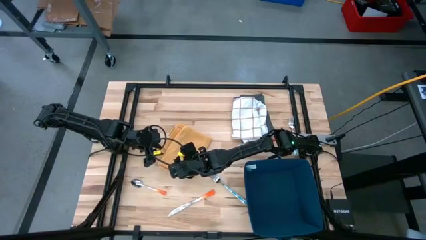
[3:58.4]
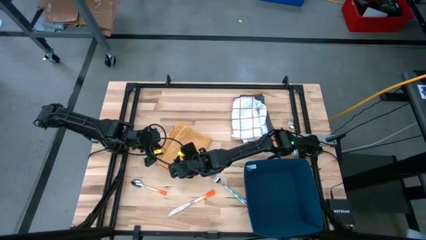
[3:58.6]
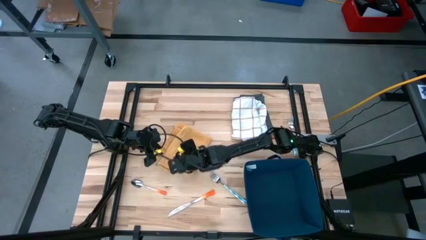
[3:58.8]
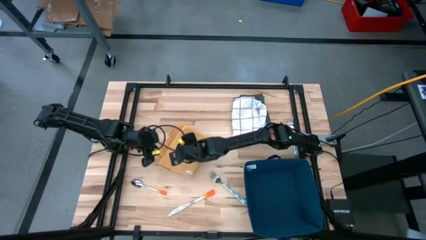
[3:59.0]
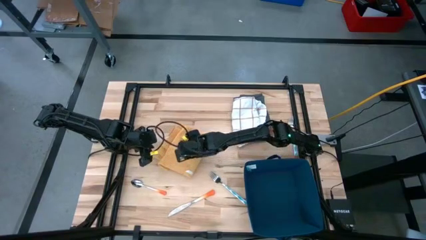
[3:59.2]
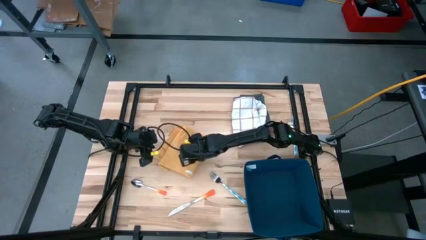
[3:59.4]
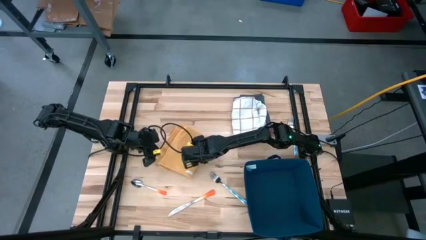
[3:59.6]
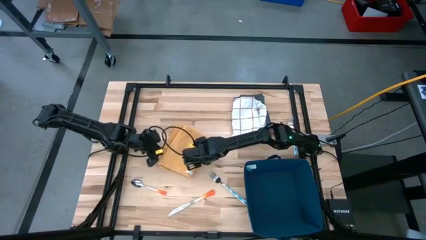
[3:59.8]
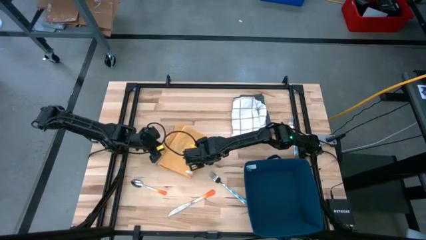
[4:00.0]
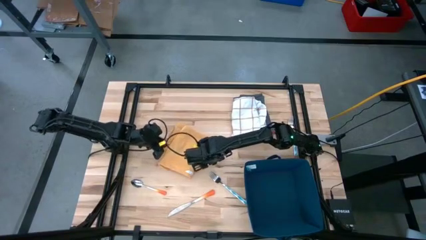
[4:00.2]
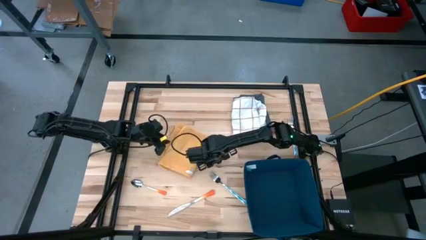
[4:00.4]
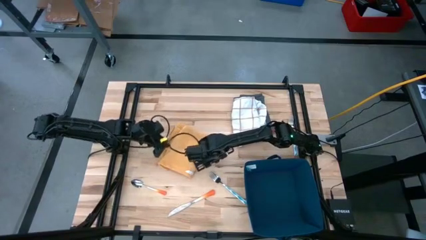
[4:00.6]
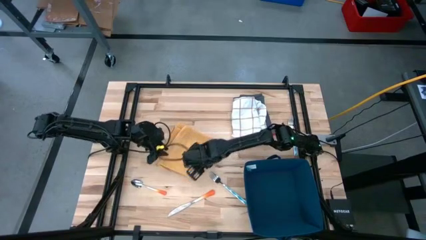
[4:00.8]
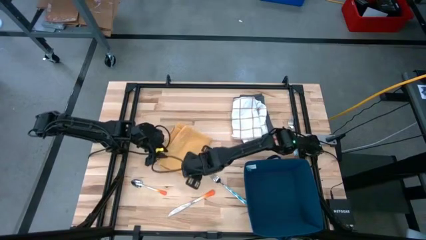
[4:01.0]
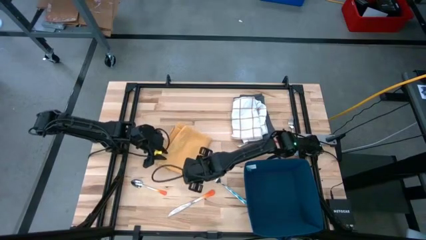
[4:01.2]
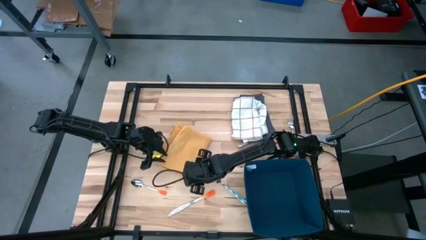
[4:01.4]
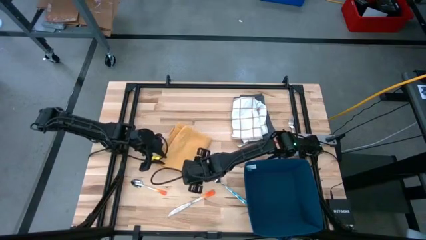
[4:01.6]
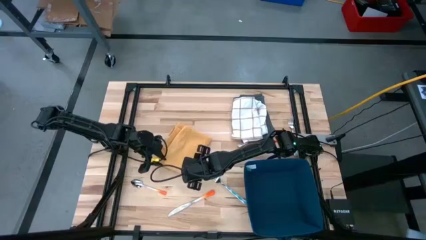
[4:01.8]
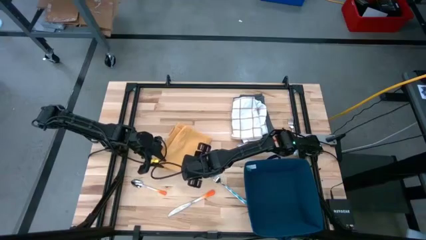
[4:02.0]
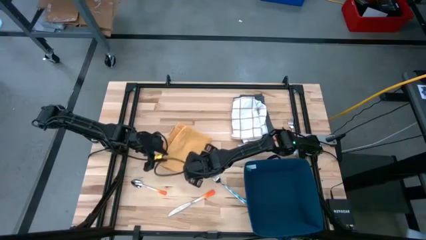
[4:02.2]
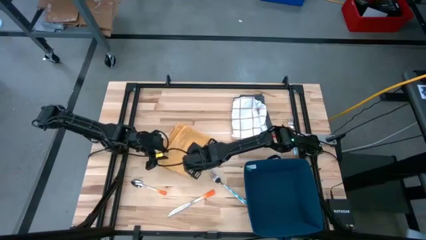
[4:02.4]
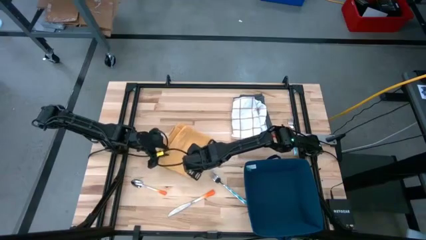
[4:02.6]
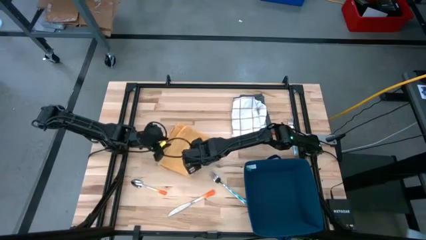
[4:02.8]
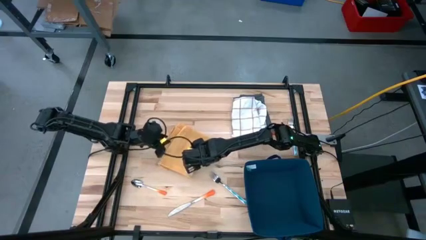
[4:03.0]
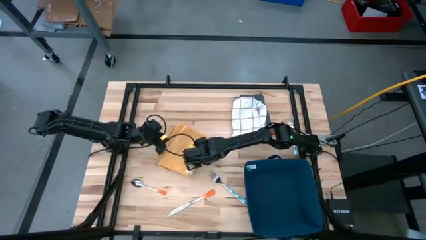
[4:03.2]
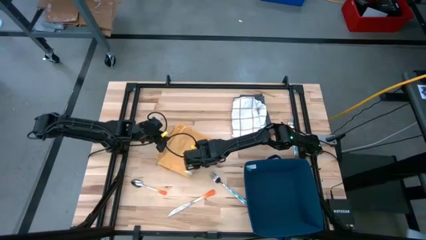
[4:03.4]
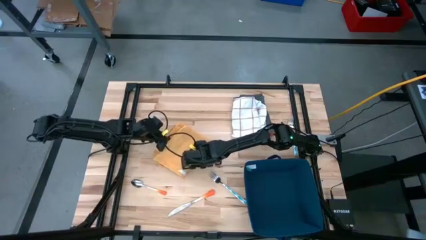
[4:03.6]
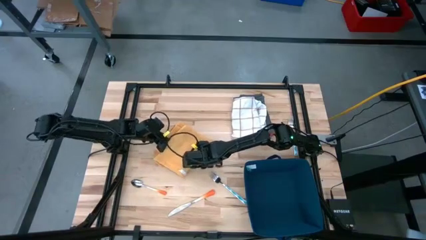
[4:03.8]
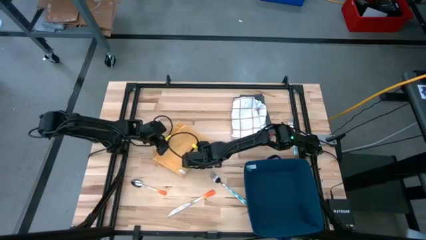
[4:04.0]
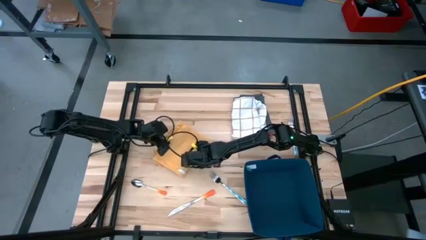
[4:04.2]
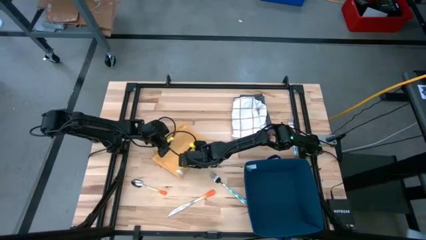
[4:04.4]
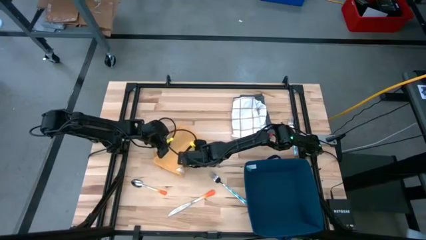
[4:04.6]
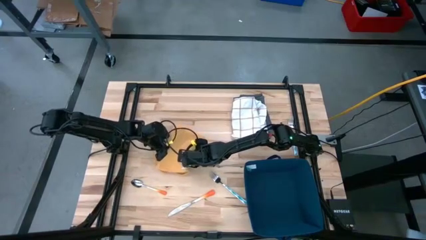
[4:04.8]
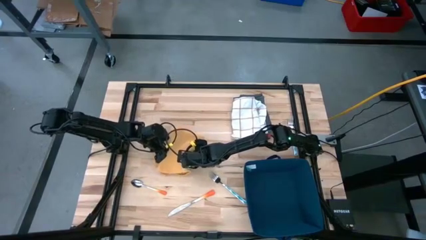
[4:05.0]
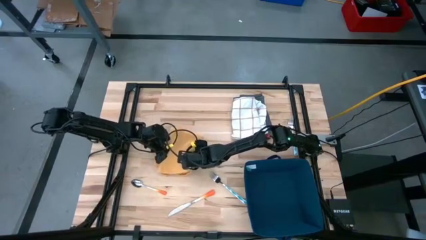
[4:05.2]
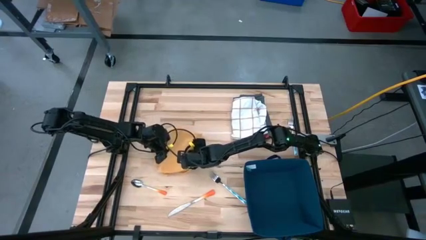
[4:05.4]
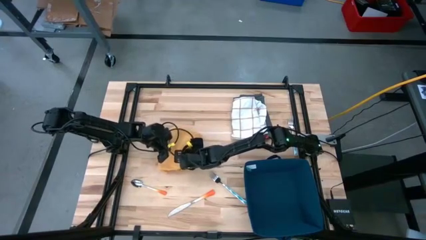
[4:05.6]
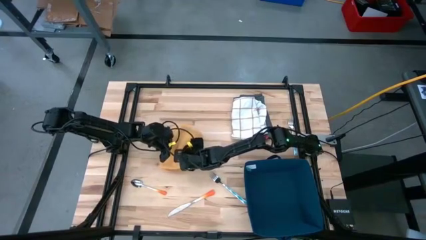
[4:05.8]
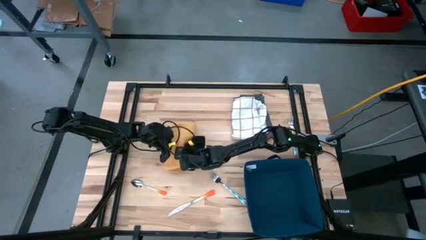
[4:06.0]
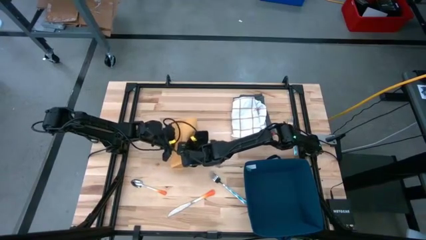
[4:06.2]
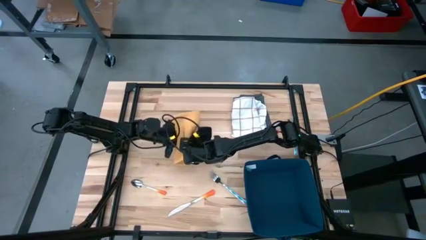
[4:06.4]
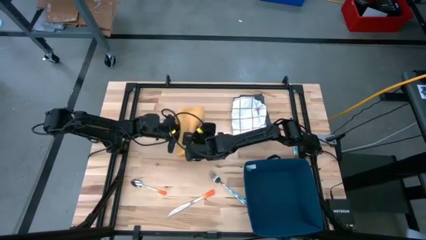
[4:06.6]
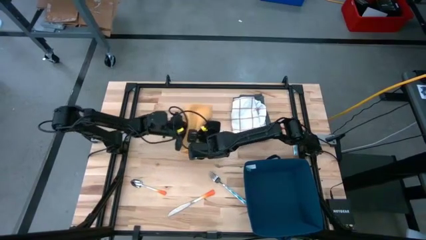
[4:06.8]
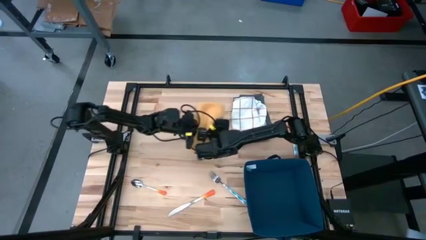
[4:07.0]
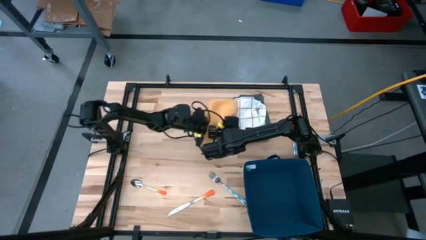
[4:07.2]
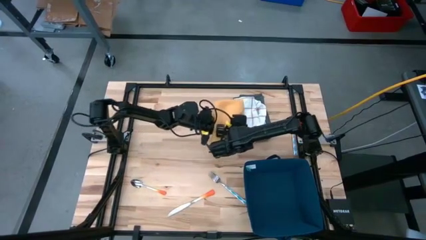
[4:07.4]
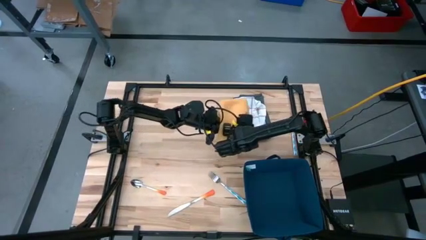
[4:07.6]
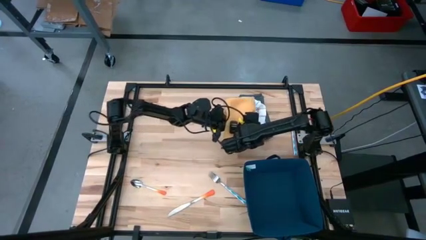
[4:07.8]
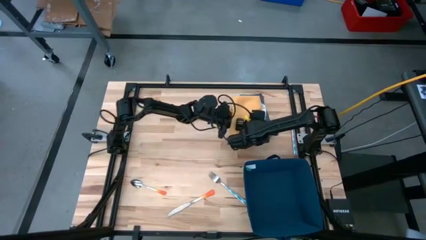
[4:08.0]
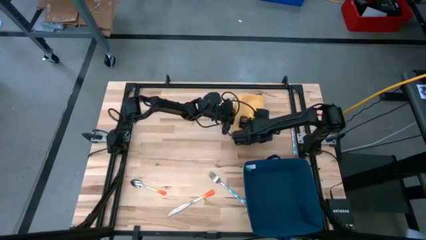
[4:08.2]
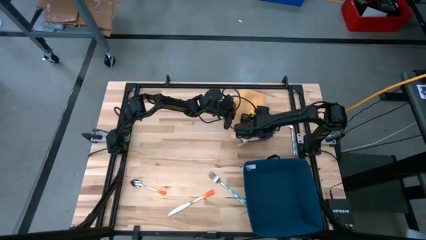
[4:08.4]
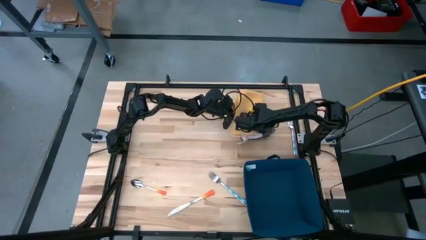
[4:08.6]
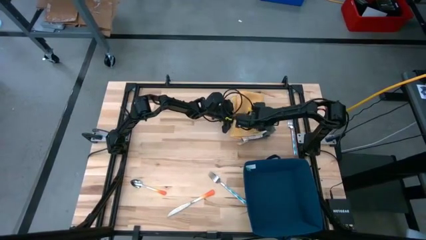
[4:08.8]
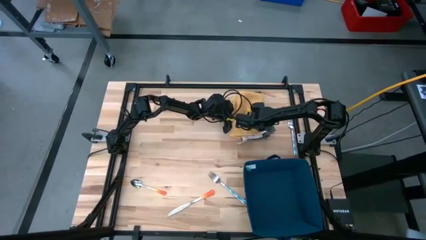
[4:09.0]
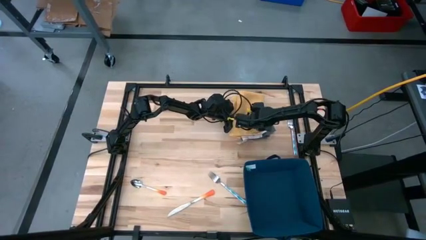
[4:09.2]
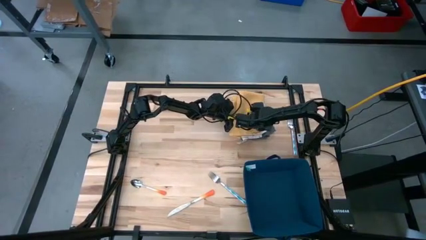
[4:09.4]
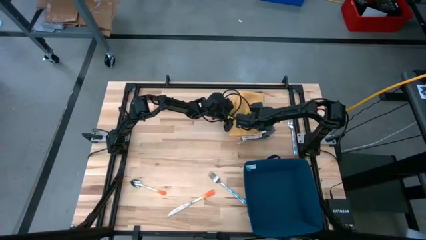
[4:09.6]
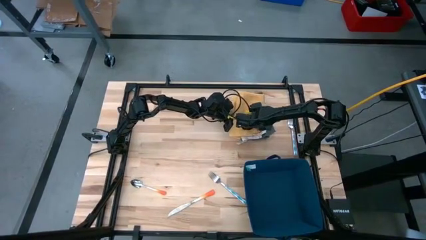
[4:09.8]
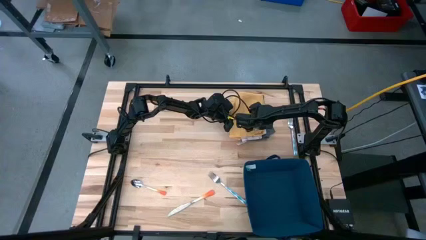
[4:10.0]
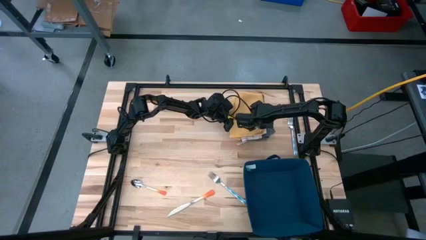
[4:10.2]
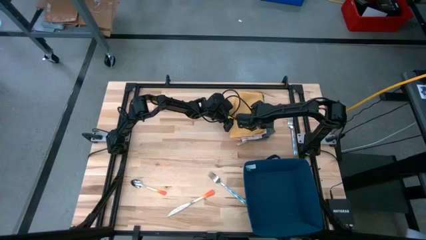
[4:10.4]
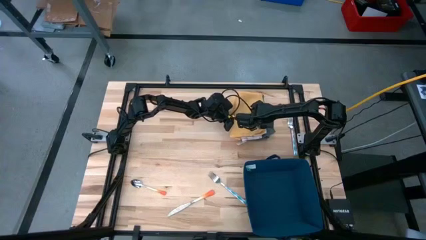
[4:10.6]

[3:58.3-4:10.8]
Task: Fold towel
Stack the orange towel on top of the white towel

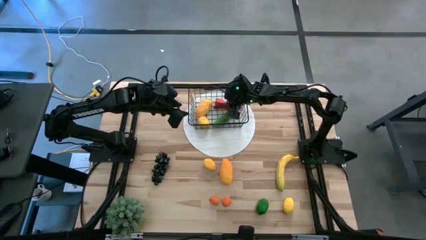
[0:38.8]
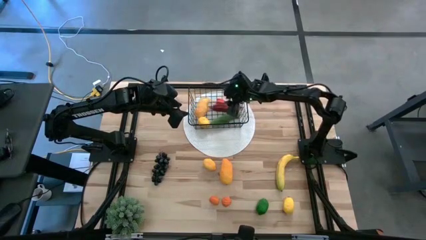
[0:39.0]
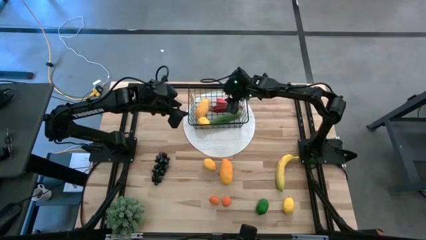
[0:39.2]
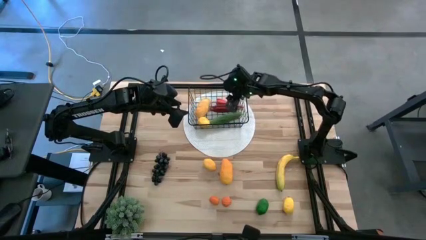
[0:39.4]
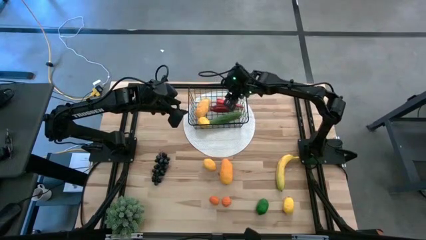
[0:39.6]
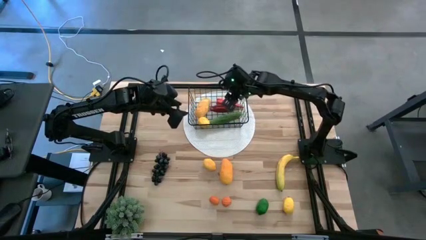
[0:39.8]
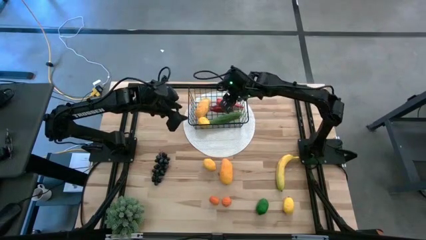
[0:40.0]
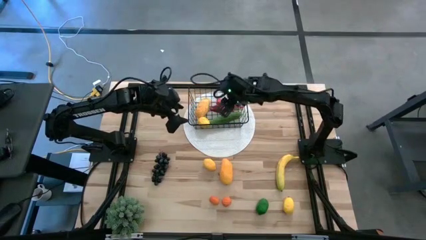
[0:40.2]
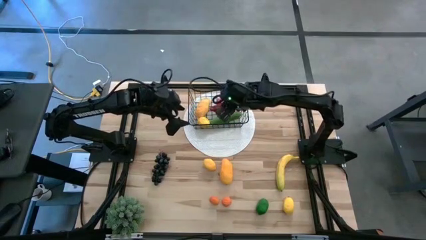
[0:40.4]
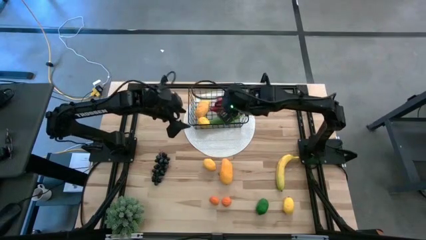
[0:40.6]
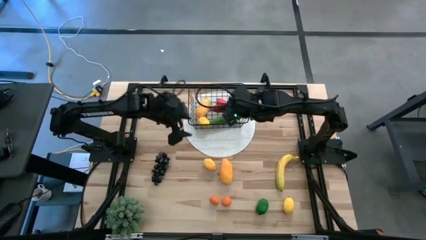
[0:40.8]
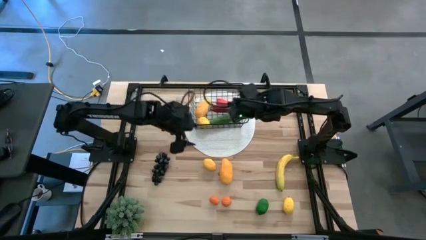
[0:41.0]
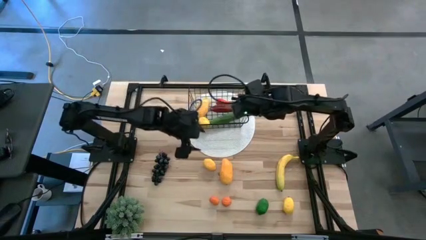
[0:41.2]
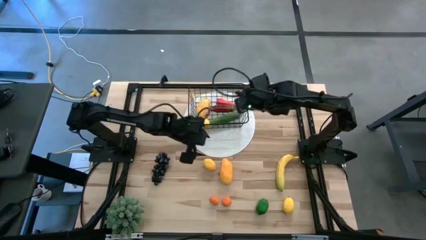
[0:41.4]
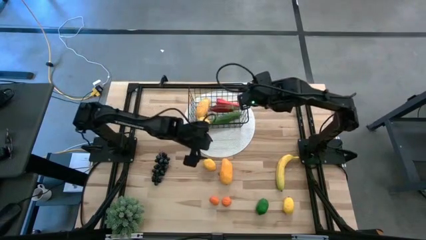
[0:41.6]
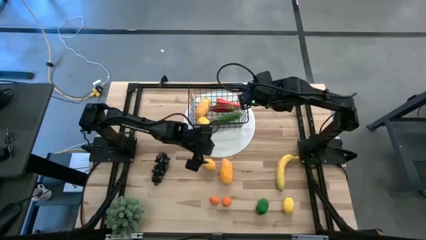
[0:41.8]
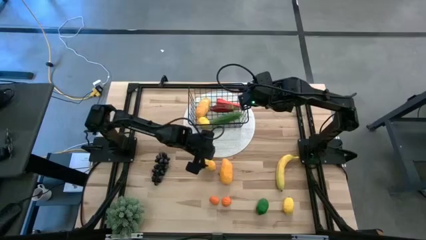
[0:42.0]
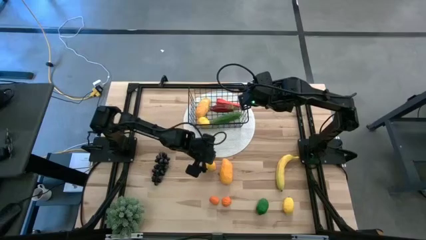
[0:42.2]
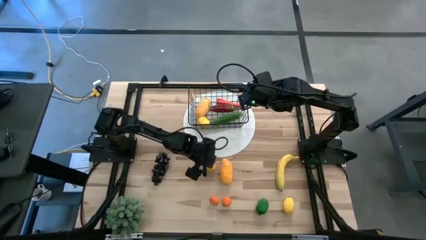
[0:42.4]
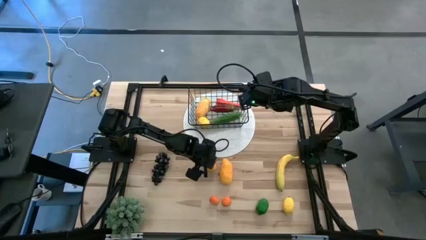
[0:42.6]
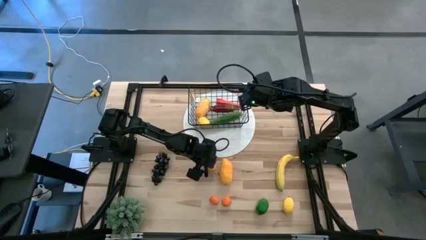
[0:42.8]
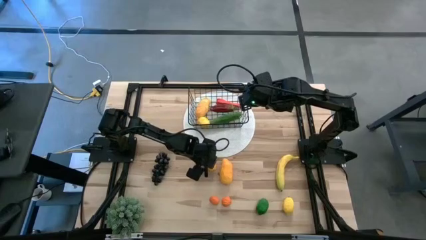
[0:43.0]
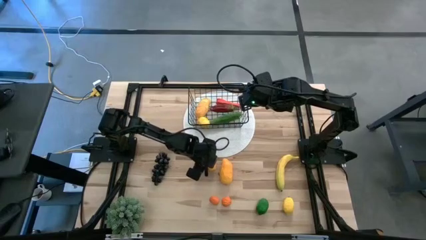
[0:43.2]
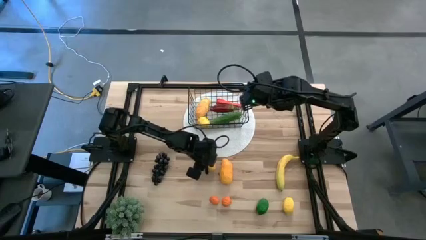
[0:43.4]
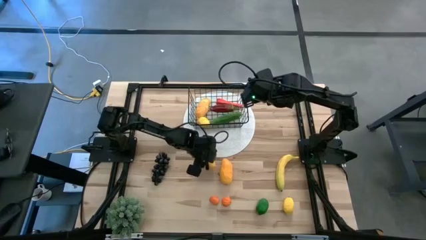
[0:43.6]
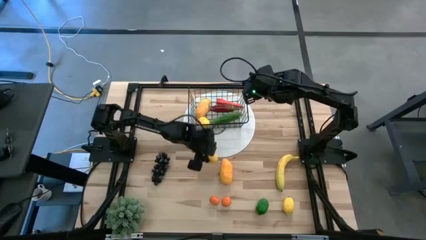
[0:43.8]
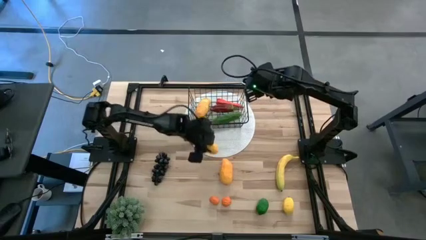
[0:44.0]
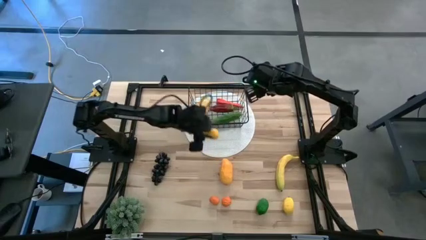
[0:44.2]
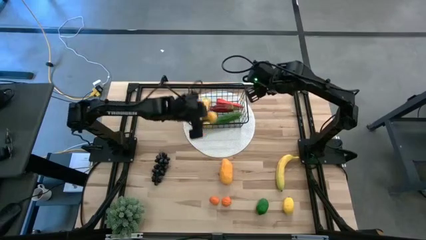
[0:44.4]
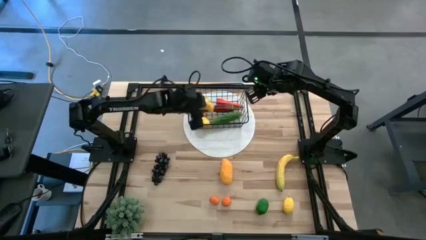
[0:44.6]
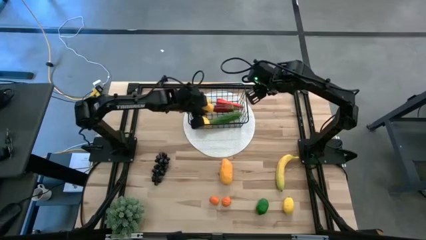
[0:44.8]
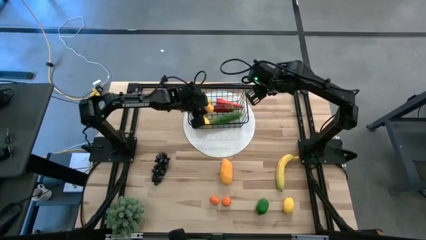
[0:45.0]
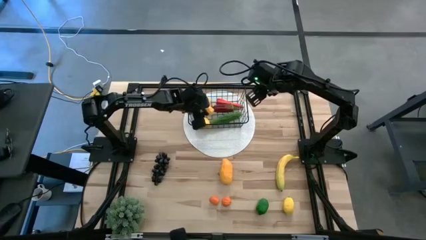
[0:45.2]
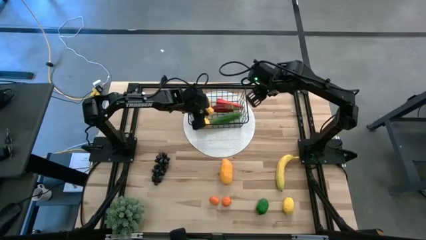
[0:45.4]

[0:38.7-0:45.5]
Task: Build produce basket
Put the left yellow lemon into the black basket
